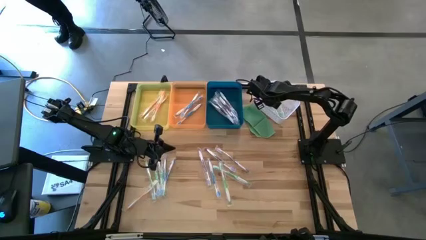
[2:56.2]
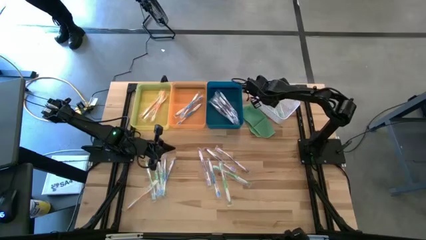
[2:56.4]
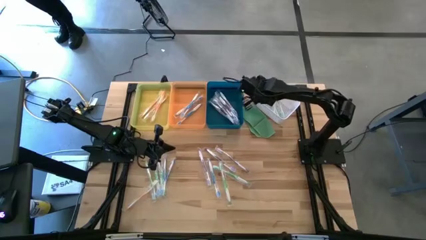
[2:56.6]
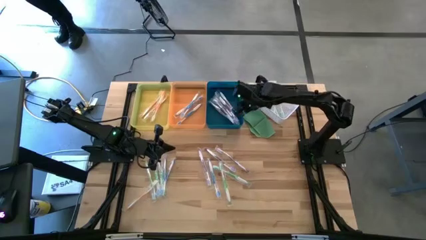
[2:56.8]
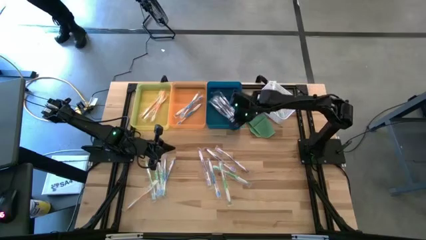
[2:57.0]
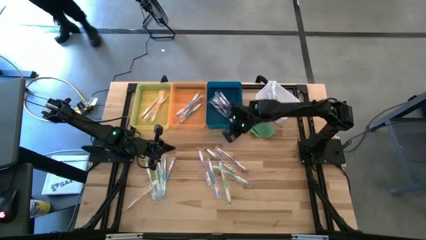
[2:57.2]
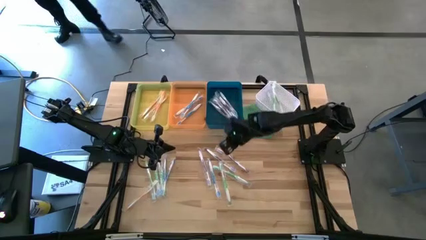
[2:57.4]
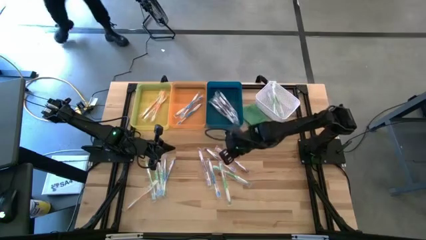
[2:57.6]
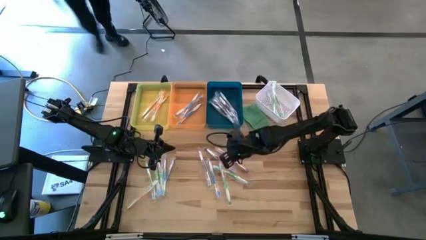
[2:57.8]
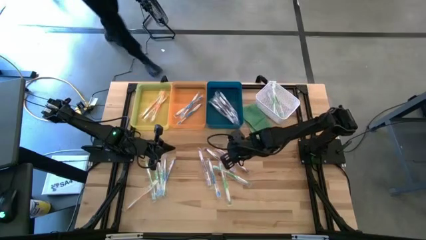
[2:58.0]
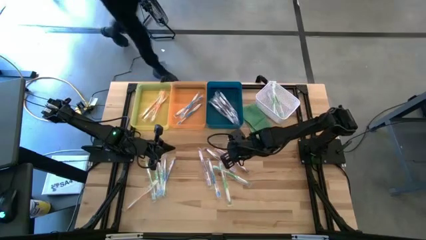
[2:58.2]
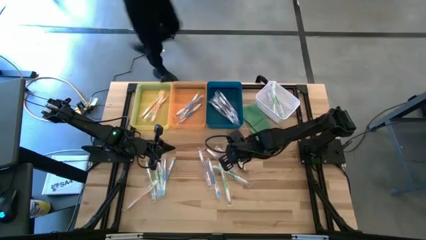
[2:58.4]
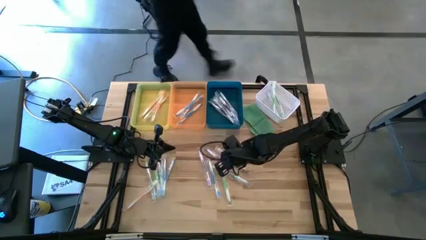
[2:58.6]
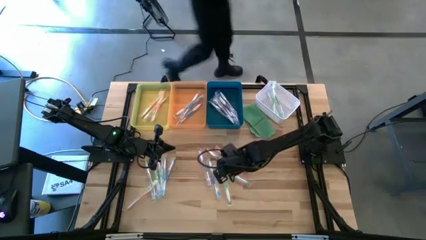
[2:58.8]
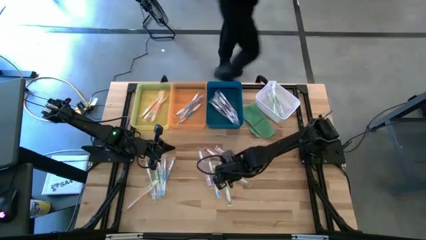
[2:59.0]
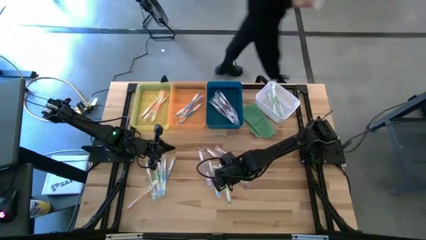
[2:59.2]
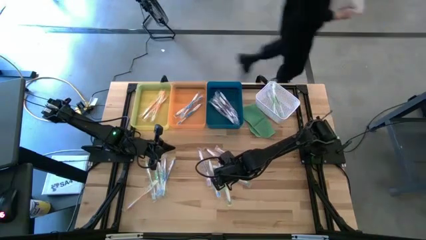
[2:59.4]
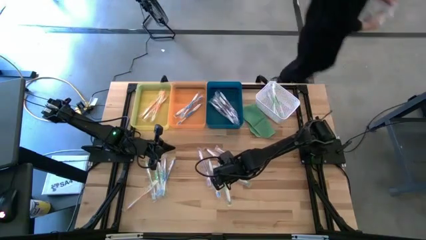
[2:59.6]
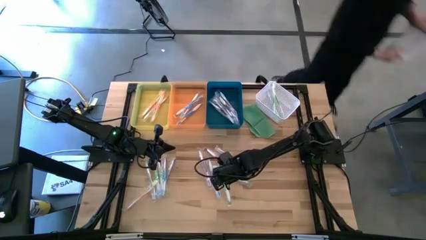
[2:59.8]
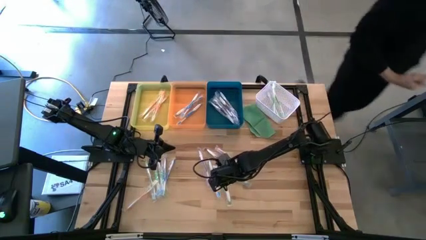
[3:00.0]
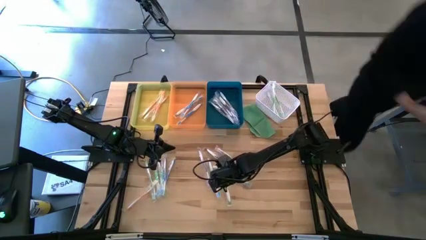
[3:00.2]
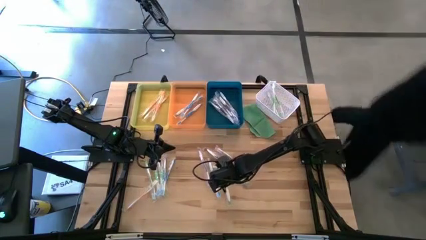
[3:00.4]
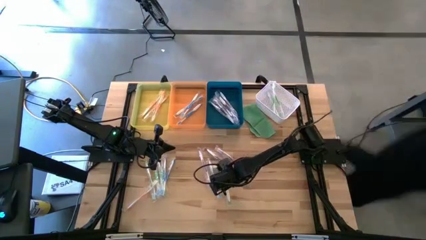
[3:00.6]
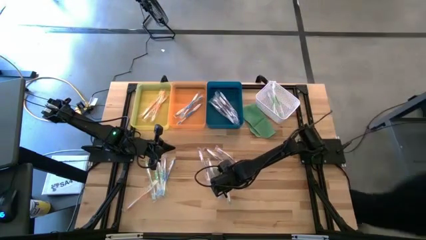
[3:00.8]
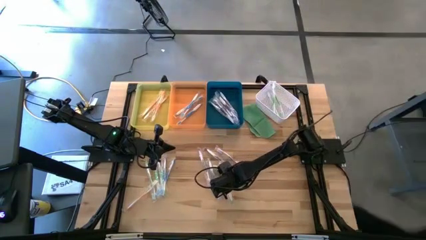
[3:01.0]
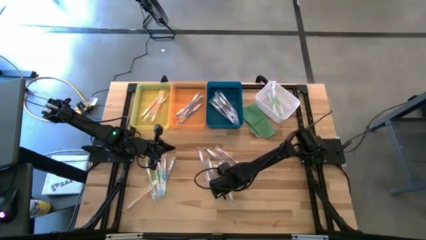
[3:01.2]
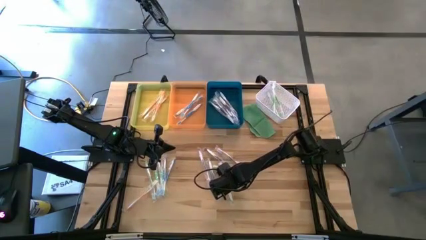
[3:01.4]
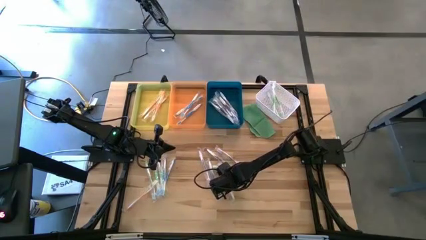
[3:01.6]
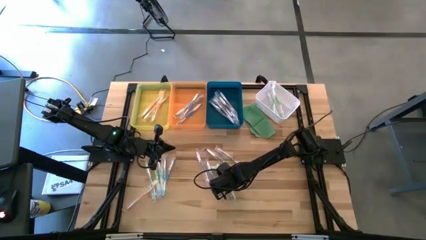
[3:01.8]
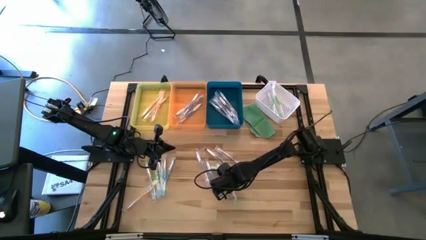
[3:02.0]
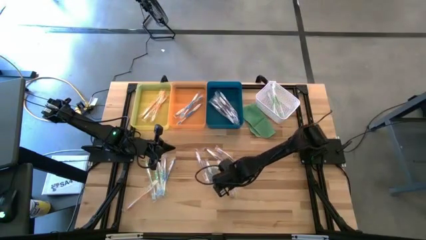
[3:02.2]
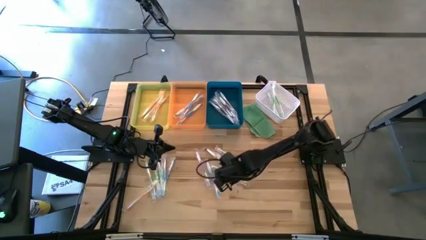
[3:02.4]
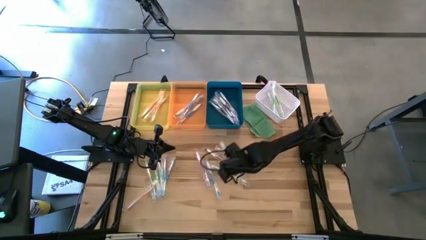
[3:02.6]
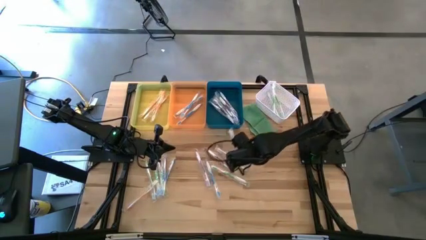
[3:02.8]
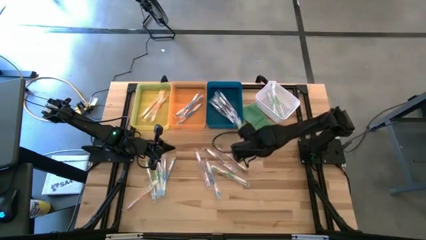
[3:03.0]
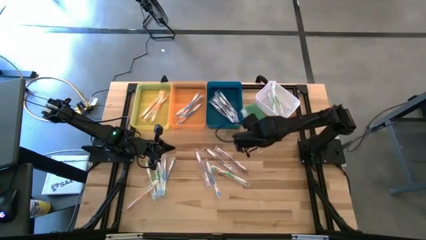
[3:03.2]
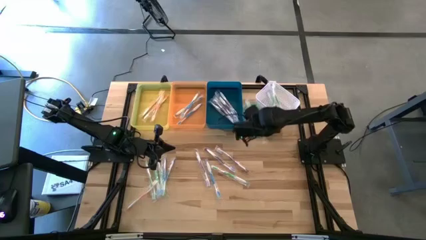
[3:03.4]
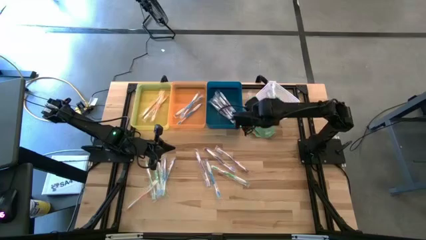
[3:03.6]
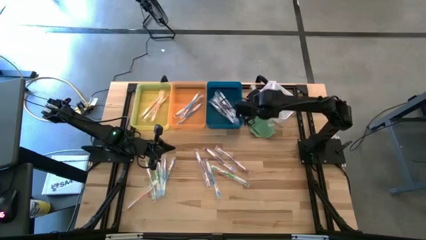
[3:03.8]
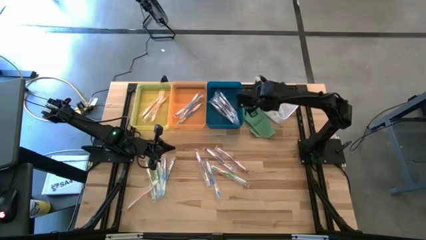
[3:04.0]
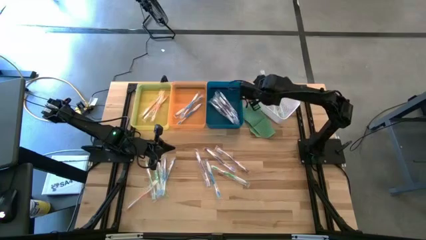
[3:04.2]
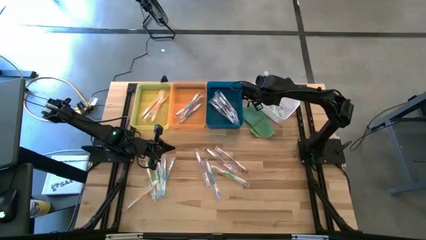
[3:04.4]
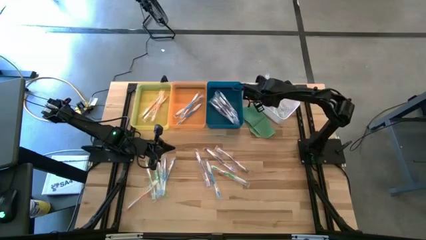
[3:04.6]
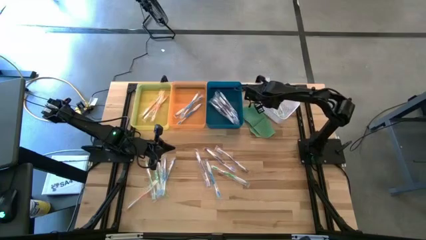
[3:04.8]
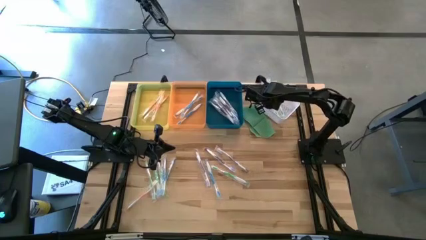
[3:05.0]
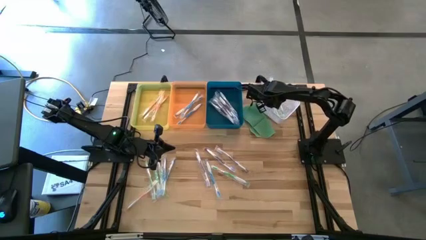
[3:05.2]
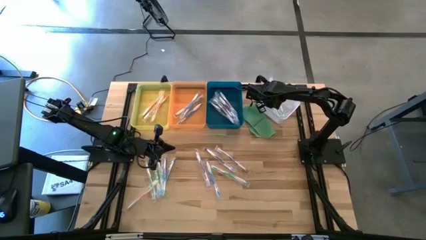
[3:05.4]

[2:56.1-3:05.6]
Task: Pick & Place Toothbrushes
Put the green toothbrush into the white bin

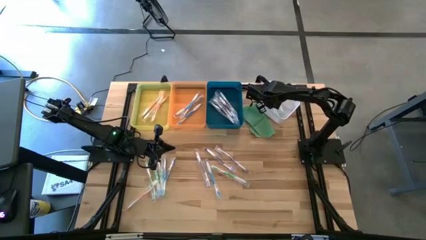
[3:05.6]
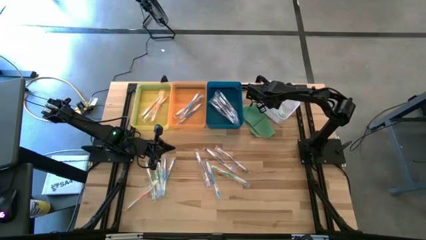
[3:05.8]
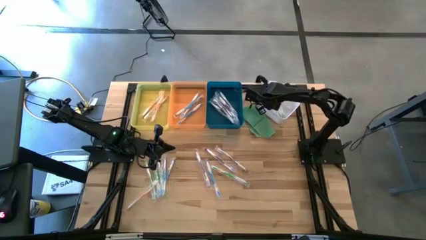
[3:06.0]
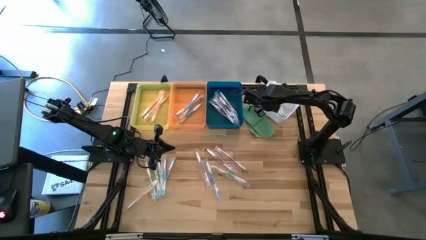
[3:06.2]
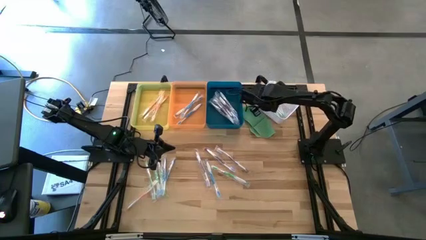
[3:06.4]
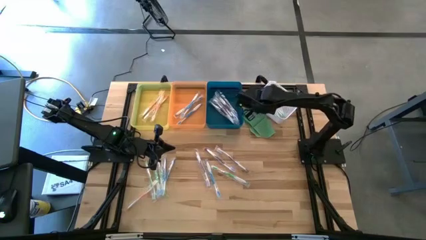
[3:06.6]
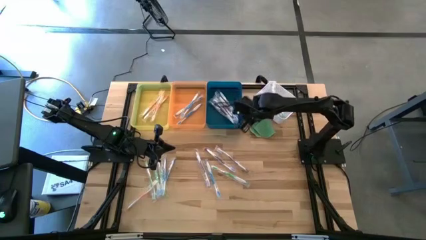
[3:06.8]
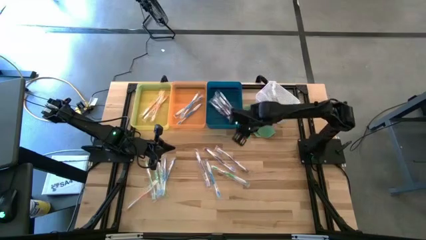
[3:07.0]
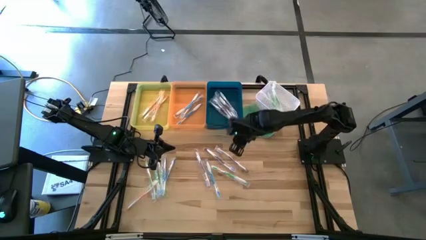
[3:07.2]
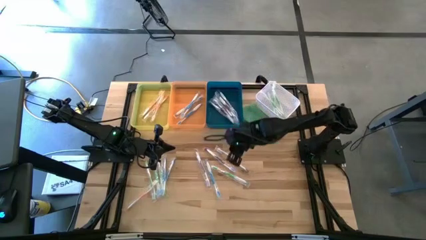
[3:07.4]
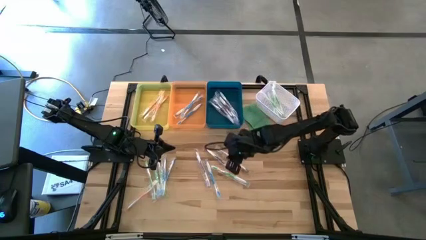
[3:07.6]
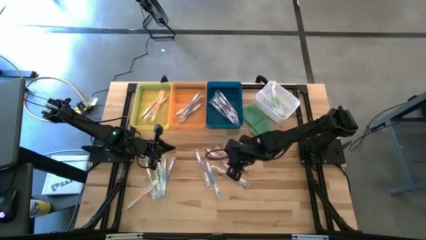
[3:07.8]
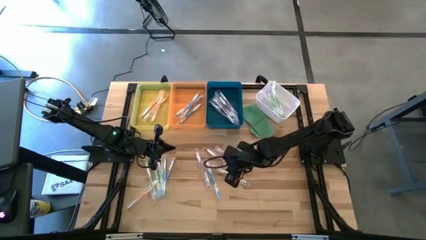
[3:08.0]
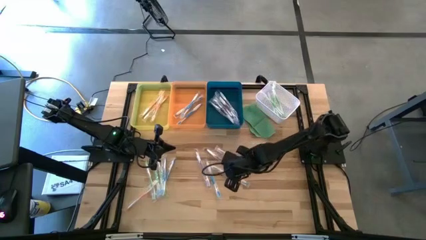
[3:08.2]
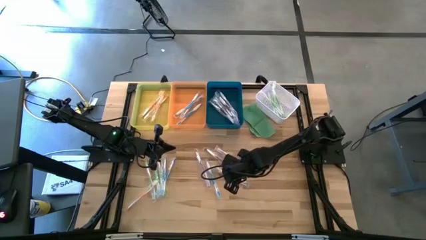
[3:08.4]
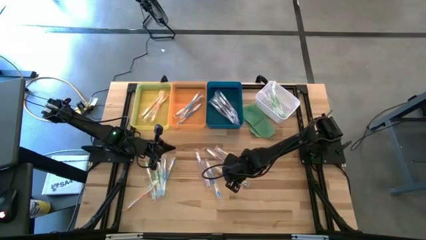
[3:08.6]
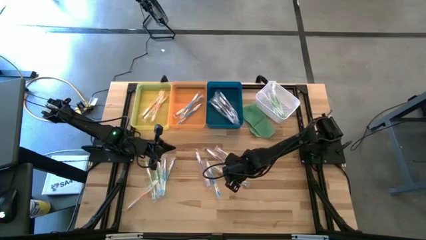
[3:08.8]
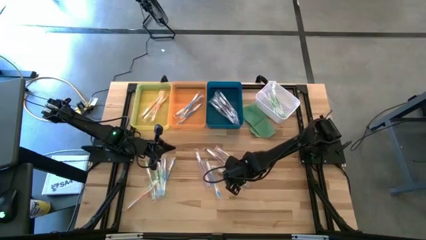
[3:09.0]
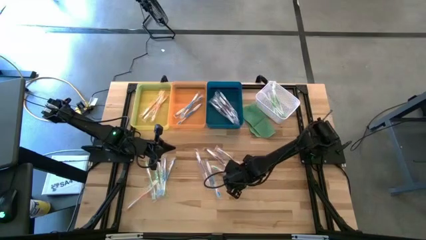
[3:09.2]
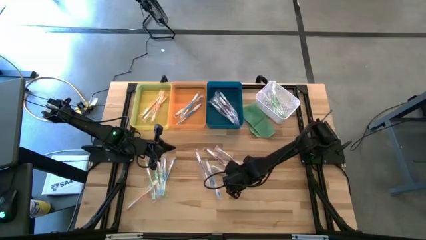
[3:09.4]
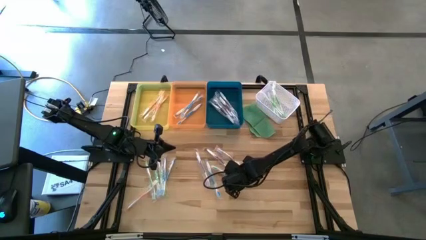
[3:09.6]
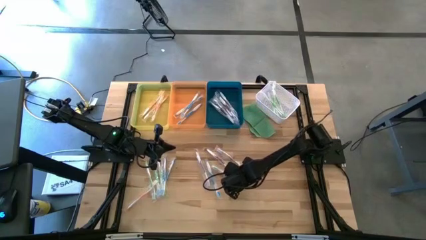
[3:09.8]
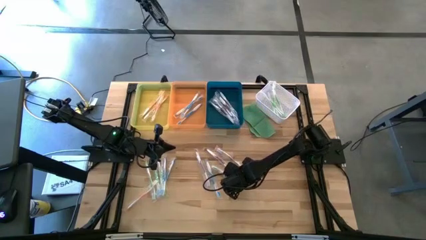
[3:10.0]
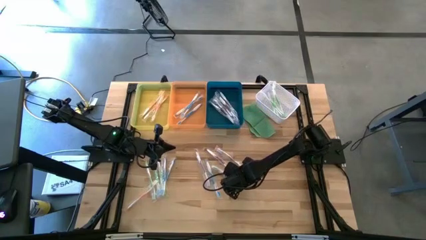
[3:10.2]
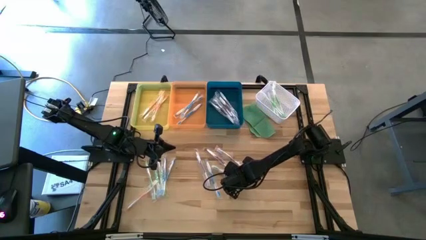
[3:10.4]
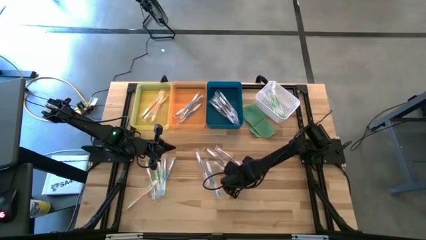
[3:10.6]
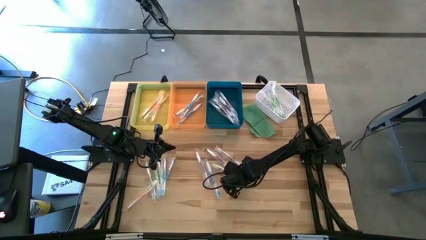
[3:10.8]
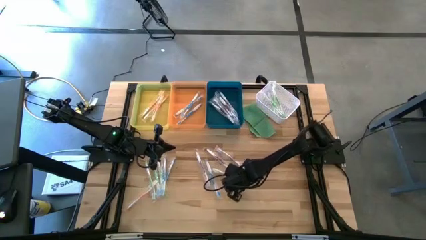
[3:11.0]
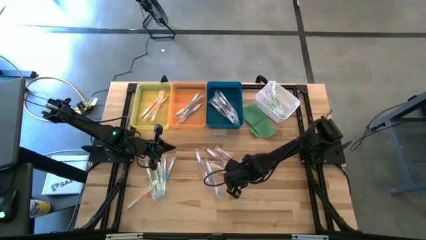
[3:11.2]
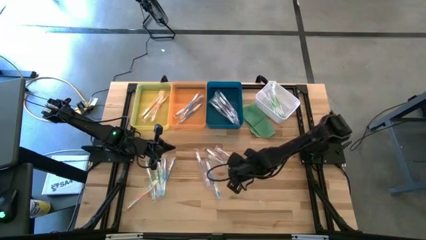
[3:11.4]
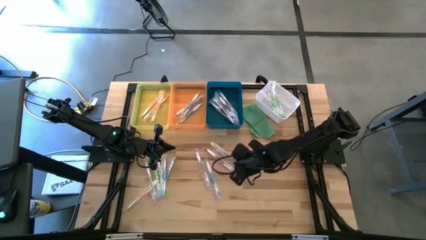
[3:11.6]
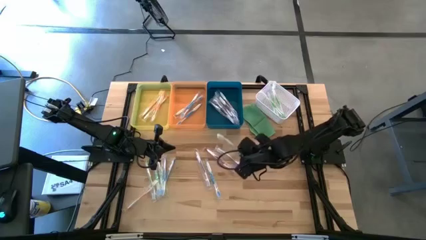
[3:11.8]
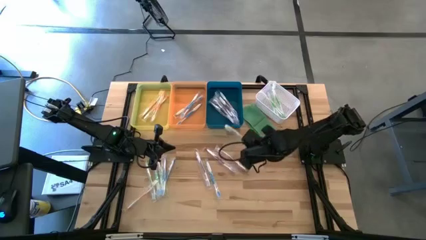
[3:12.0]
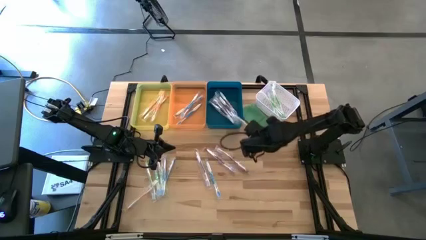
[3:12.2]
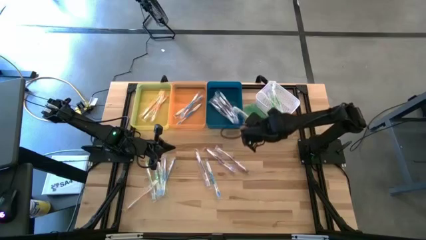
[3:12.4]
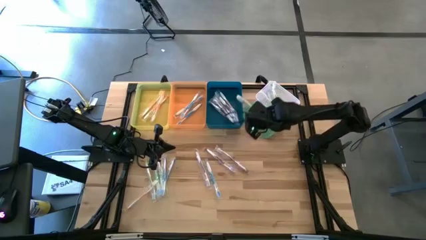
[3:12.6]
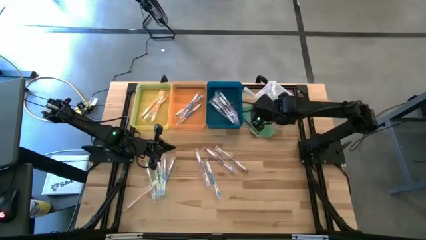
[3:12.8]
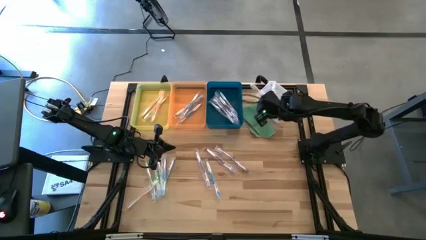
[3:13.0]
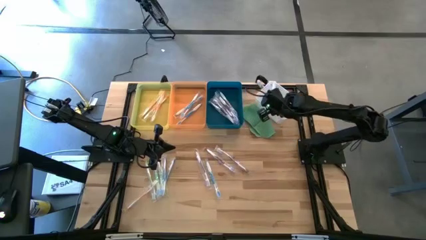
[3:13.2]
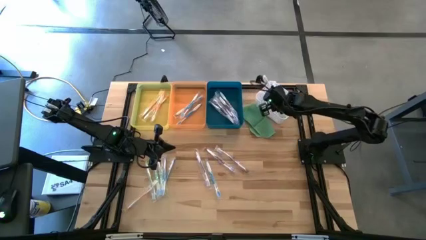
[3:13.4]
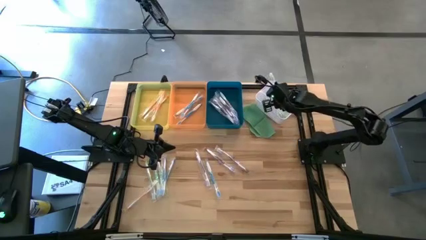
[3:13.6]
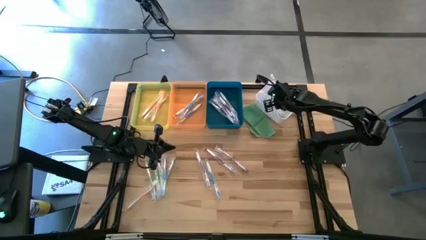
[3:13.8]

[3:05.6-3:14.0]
Put the green toothbrush into the white bin
